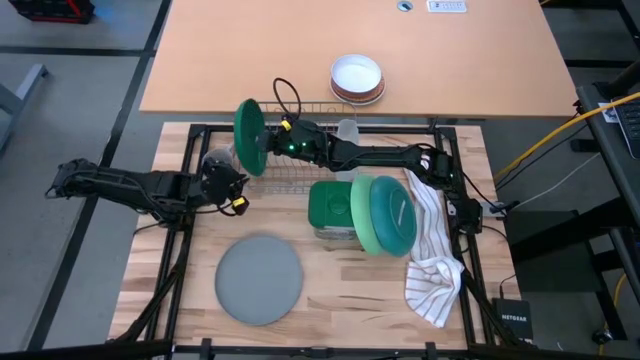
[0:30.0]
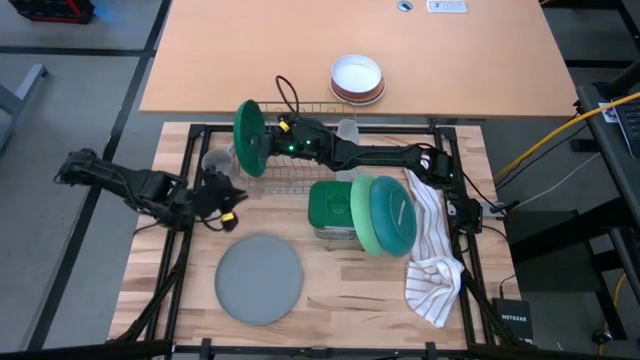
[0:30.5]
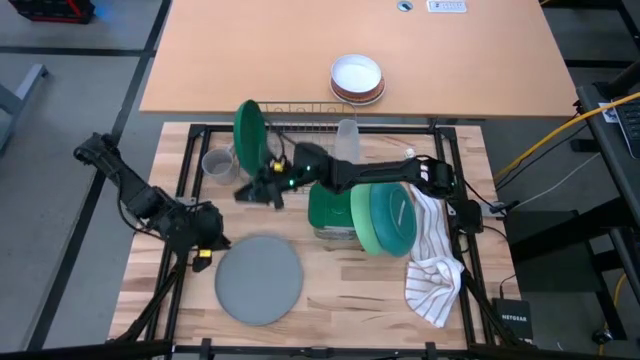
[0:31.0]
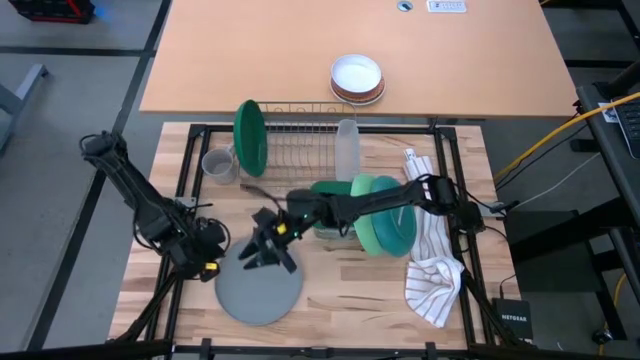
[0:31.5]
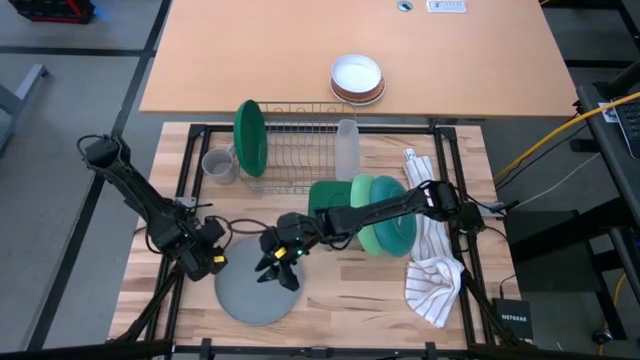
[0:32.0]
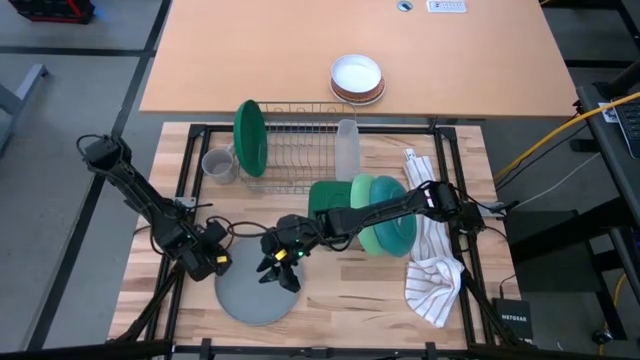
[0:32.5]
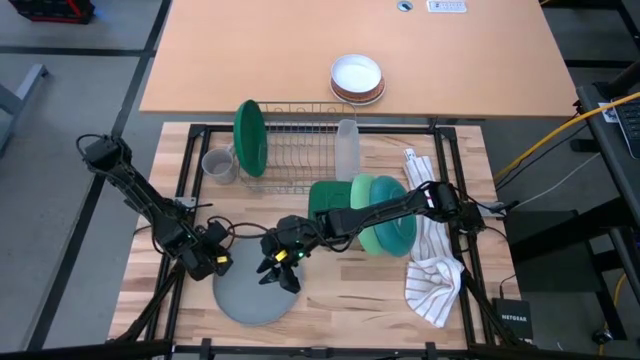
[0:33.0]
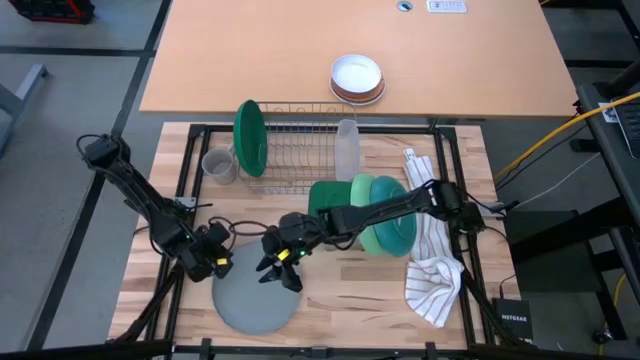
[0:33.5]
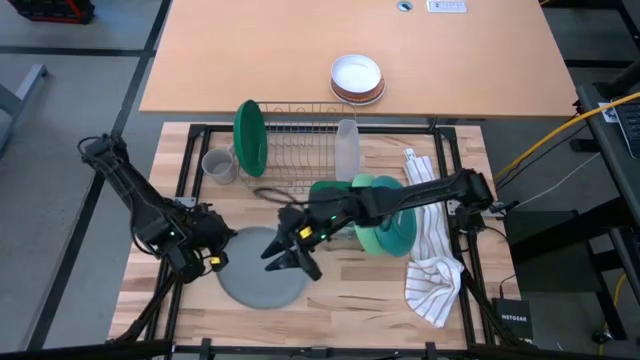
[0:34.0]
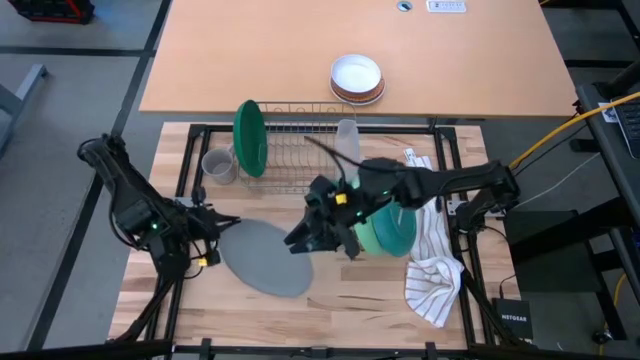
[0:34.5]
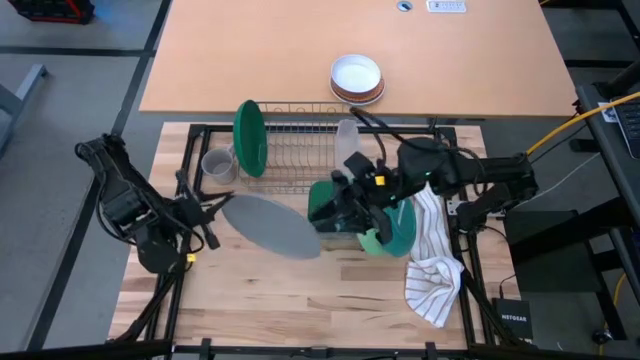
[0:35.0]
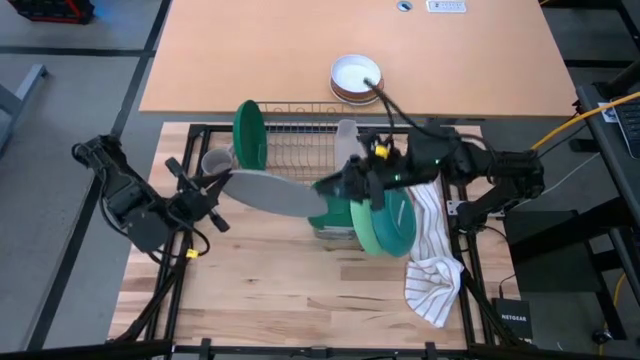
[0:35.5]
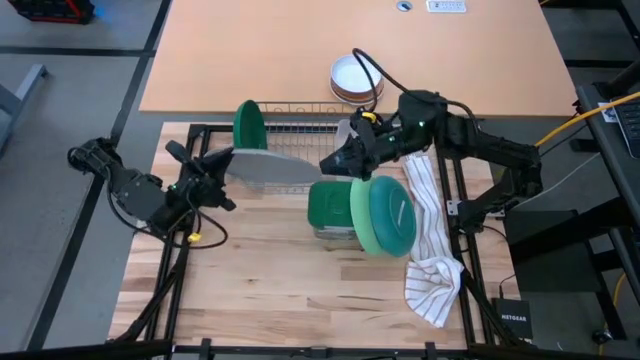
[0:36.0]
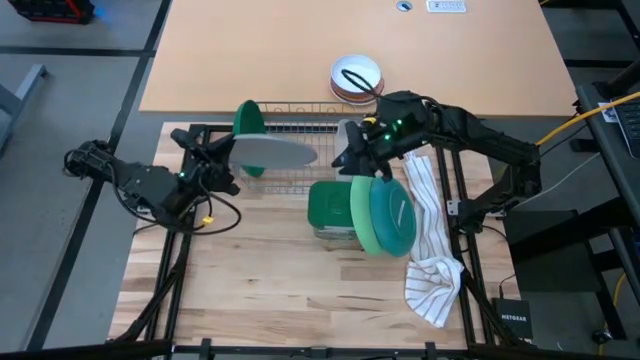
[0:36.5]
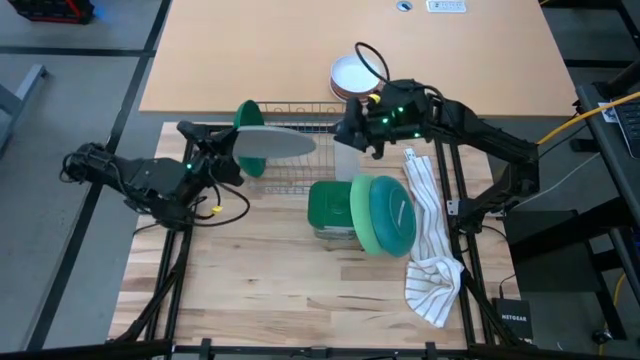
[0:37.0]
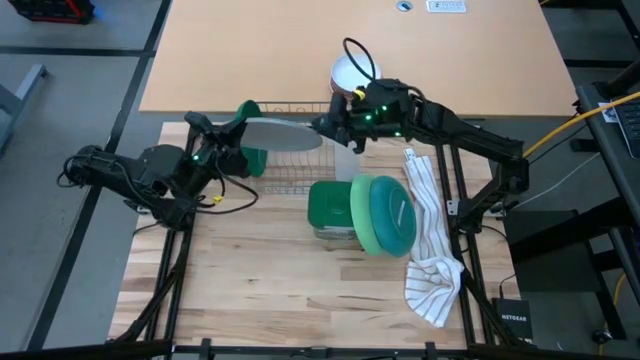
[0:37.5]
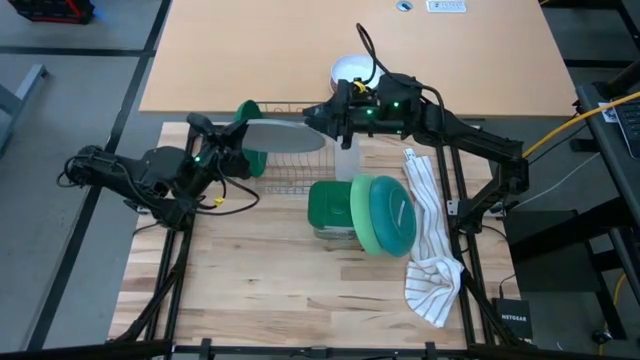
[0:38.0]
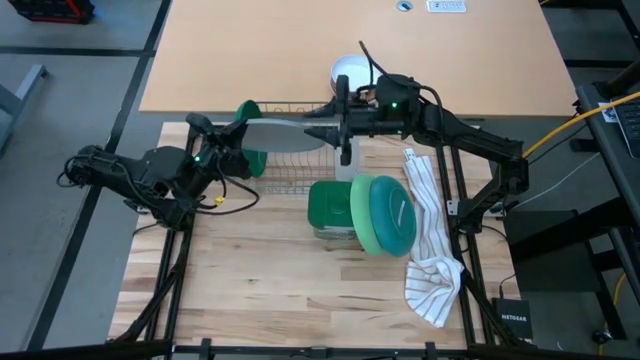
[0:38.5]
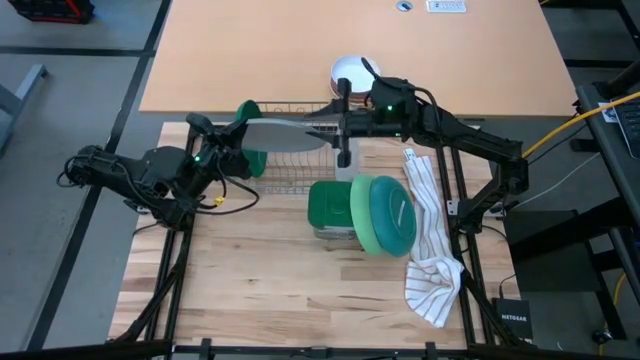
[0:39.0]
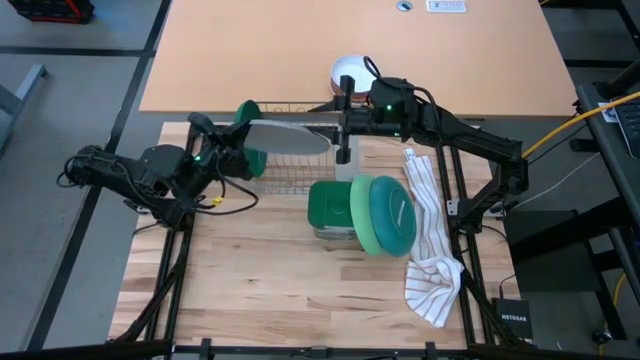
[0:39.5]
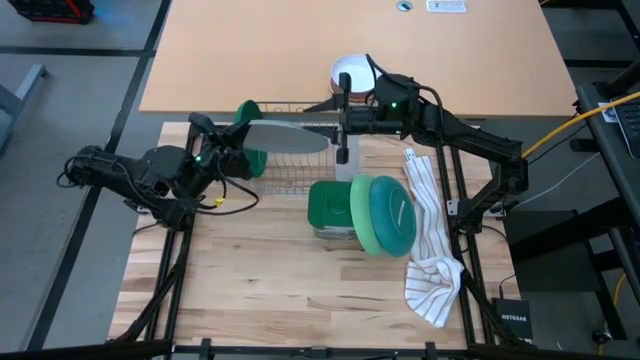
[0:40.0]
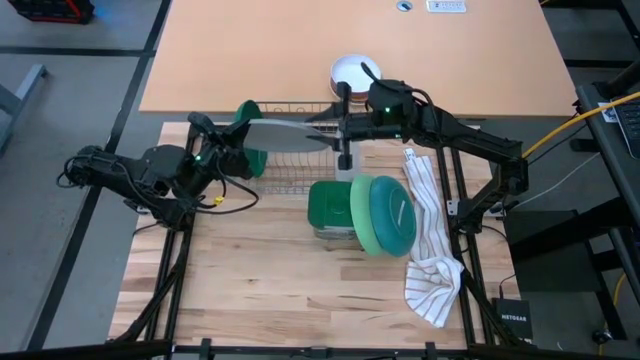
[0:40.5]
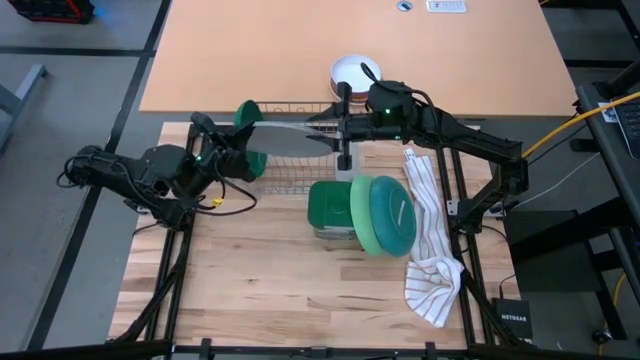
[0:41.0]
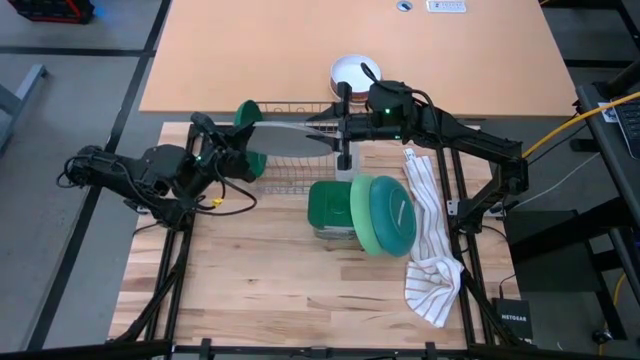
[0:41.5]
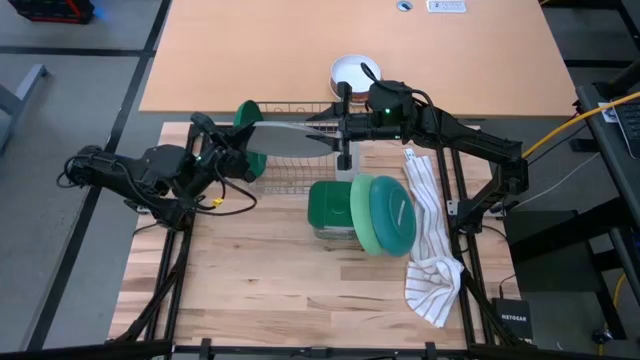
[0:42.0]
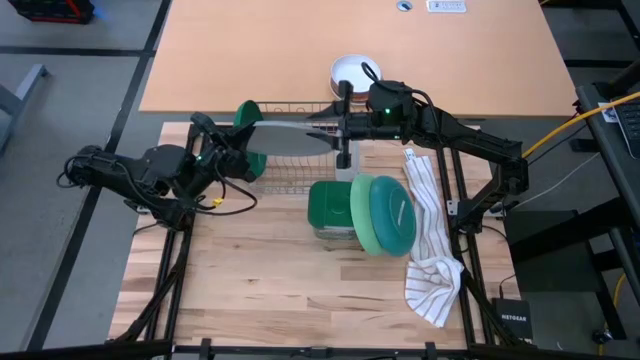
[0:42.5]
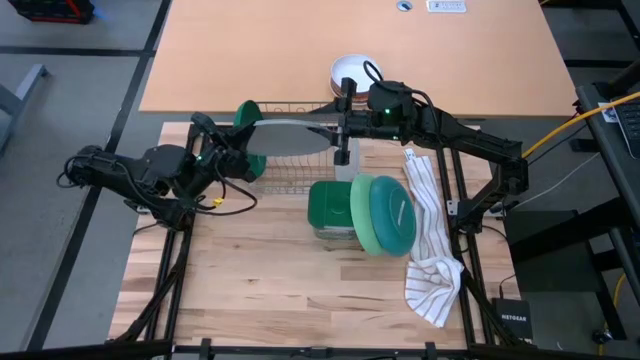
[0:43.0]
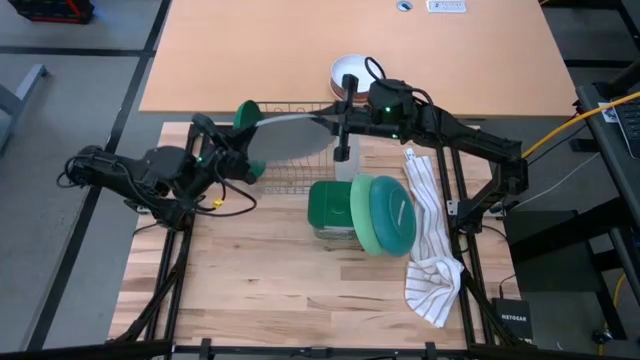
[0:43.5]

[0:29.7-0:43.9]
Task: Sort dishes
Put the gray plate into the dish rack

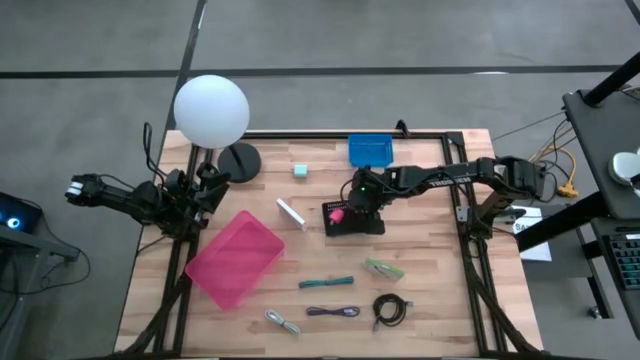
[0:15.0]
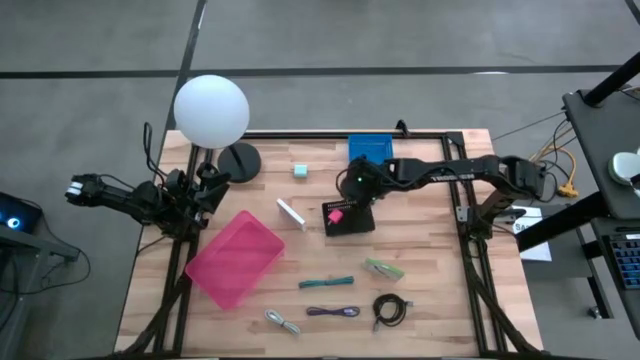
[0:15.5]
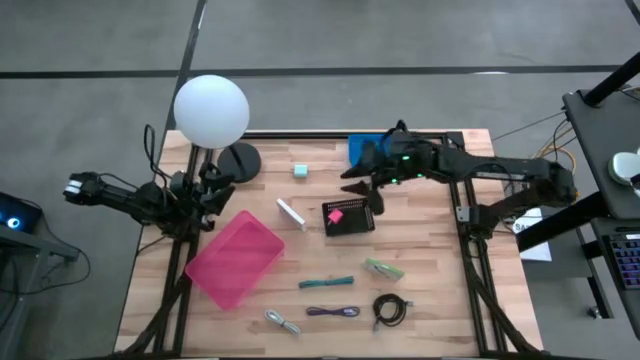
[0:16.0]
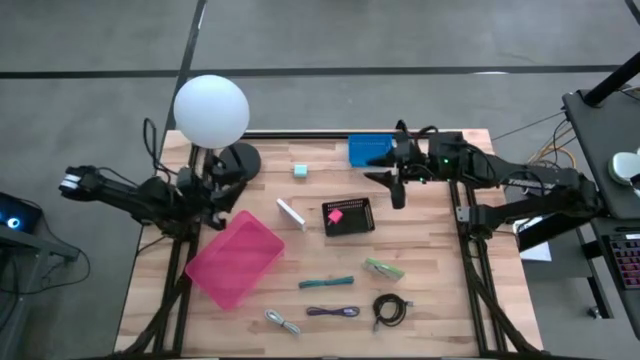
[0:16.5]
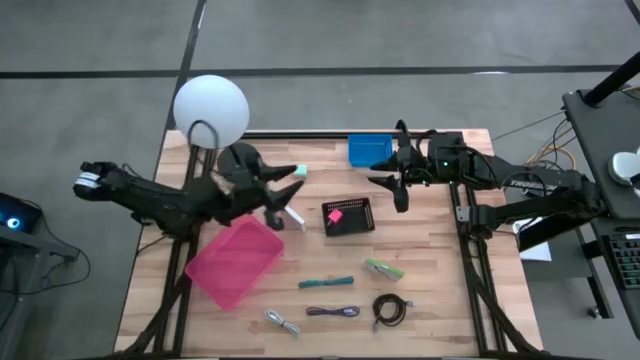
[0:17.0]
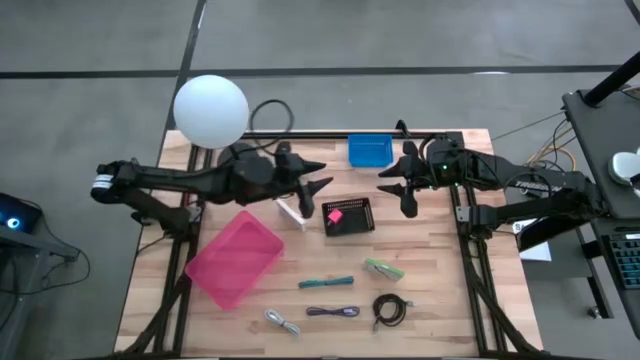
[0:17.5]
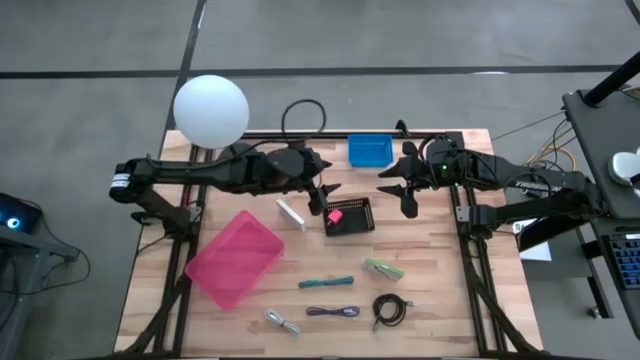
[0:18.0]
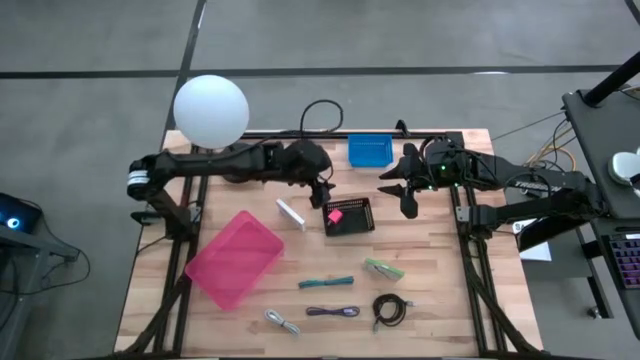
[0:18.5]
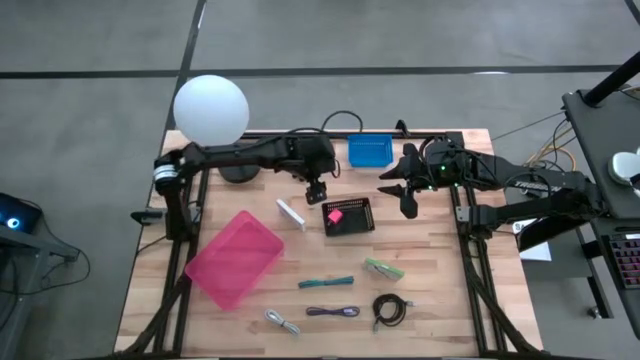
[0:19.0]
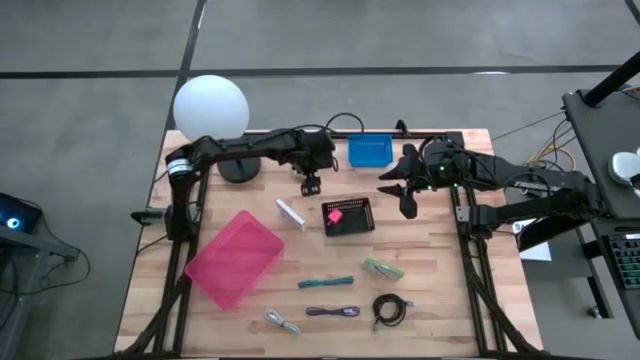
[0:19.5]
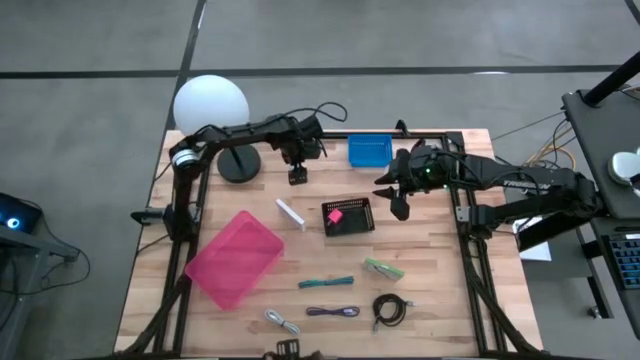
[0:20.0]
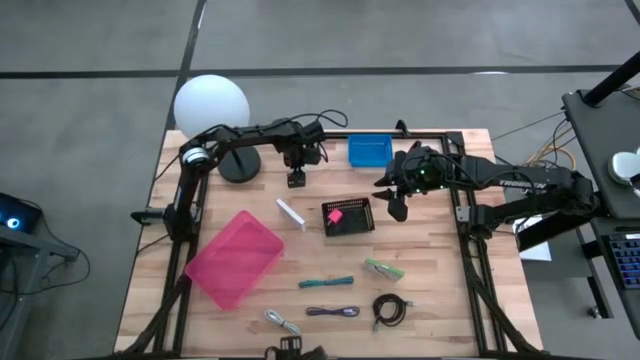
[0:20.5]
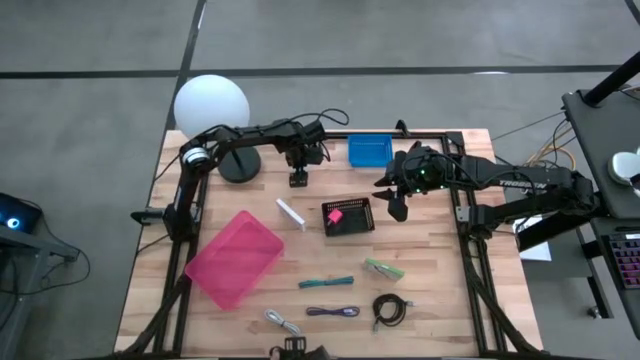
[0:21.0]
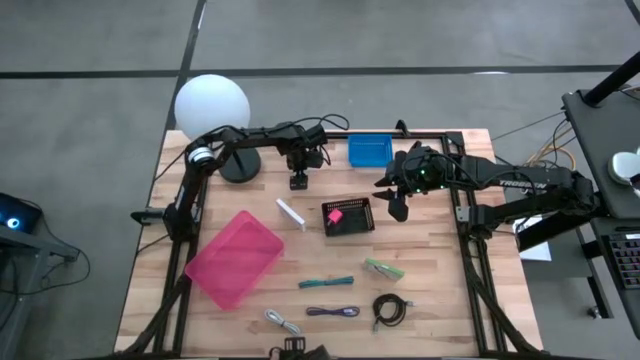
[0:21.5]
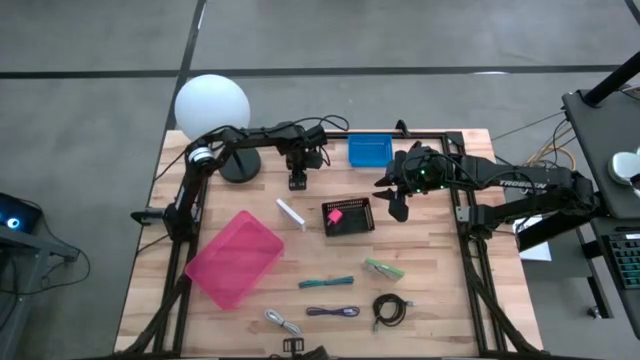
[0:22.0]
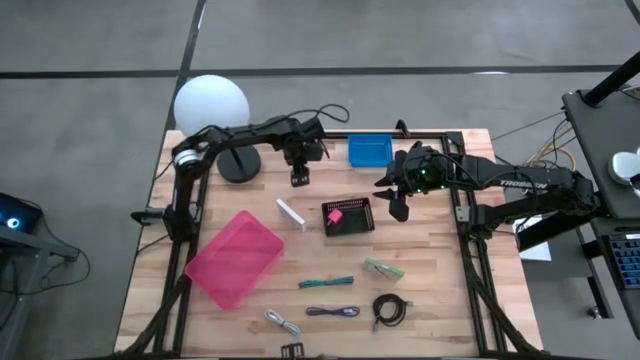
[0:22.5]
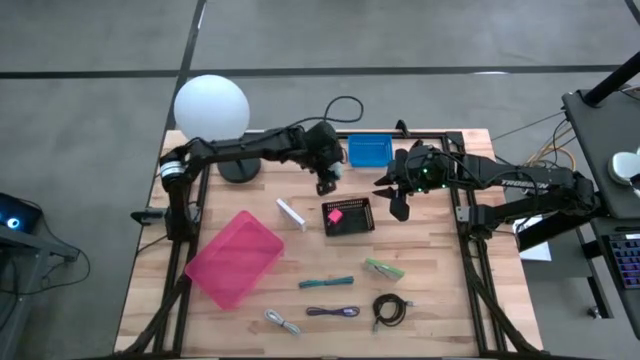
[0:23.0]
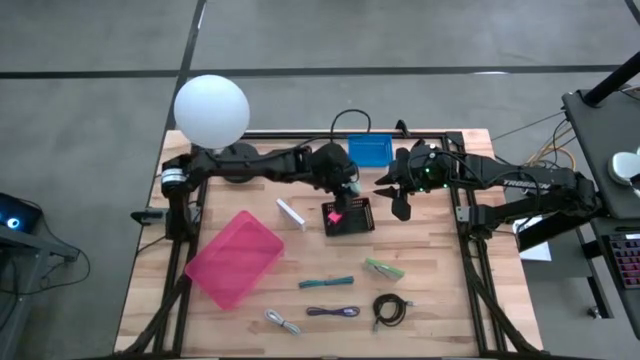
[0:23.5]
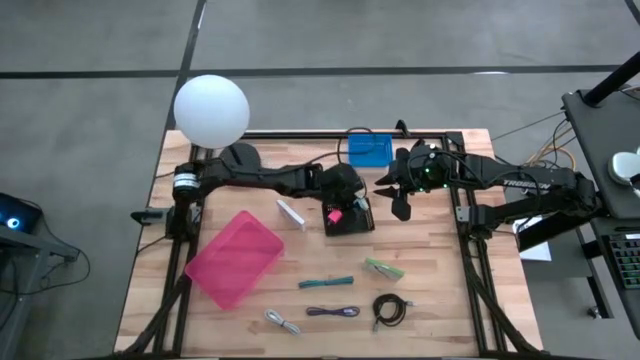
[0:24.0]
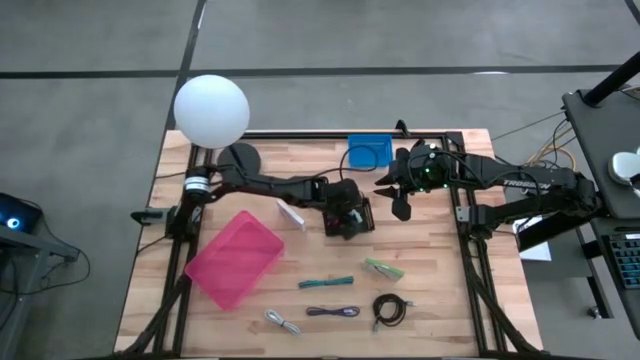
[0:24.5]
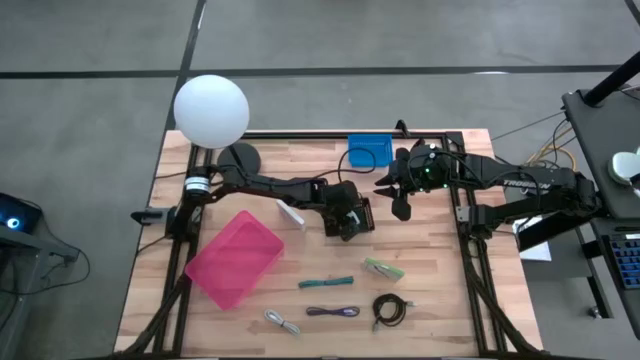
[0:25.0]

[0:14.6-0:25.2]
Task: Pick and place items into bin
Put the light blue charger adapter into the black bin
